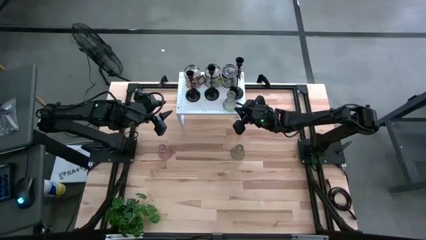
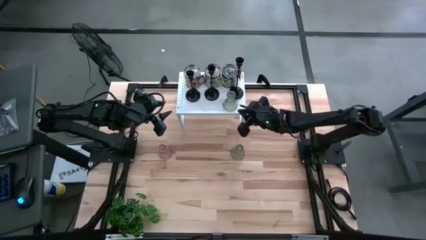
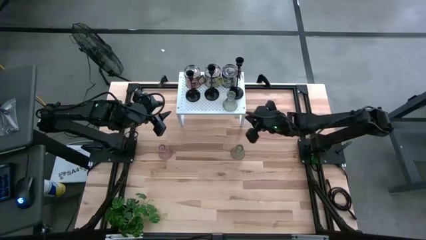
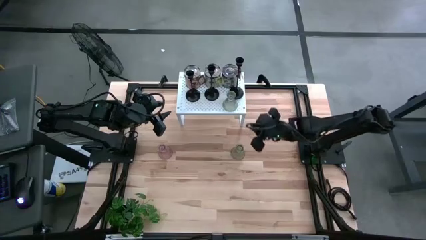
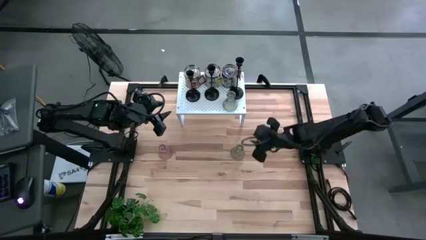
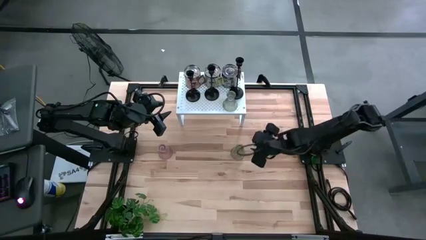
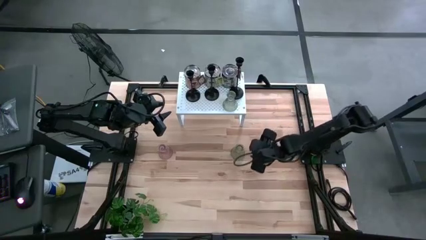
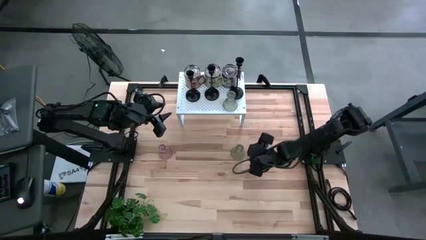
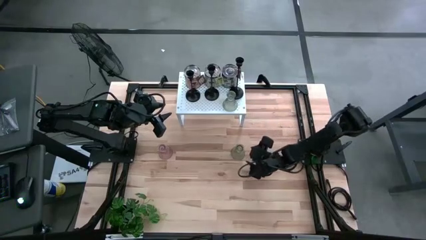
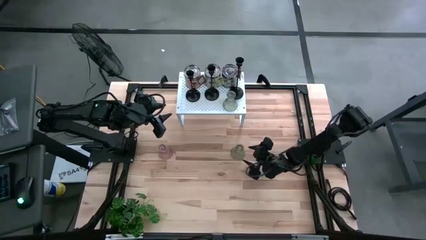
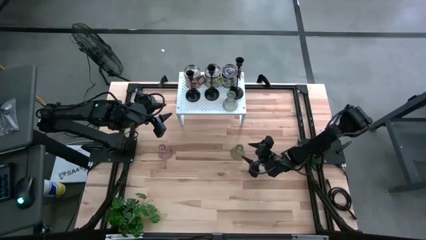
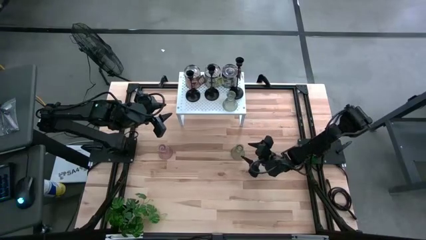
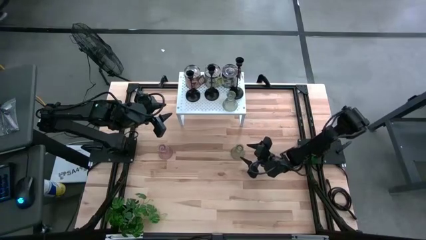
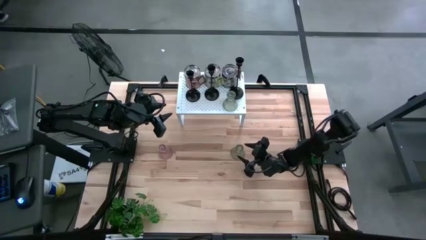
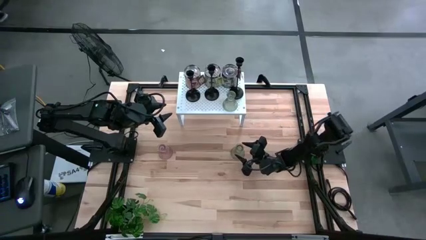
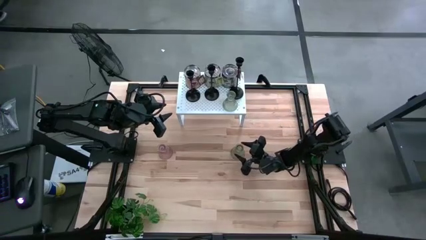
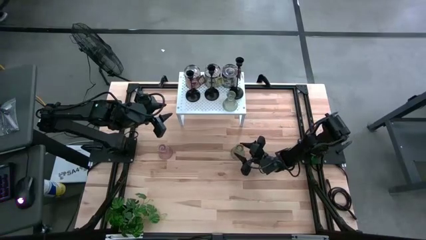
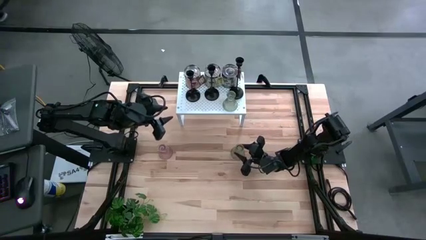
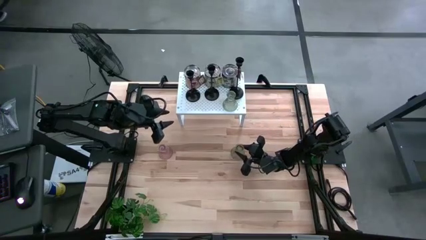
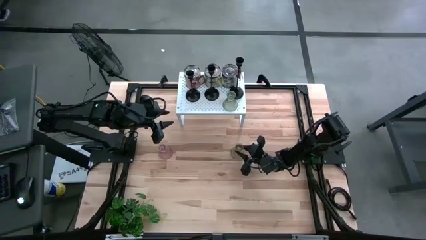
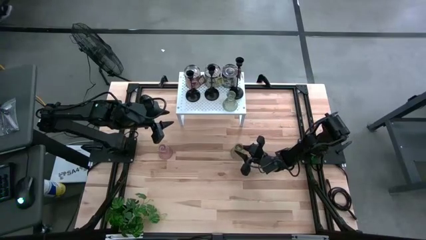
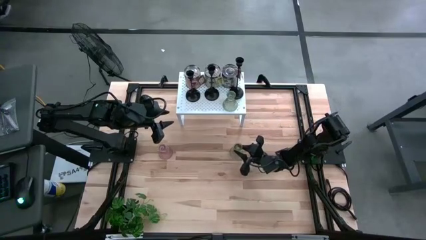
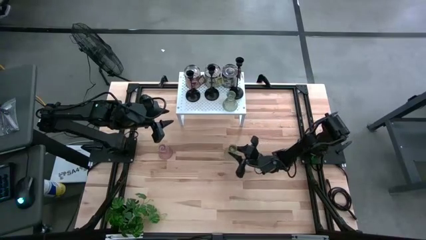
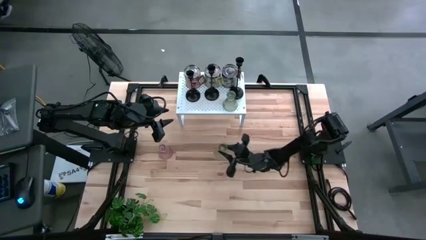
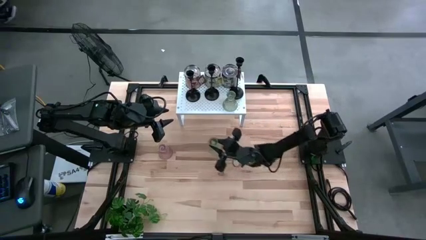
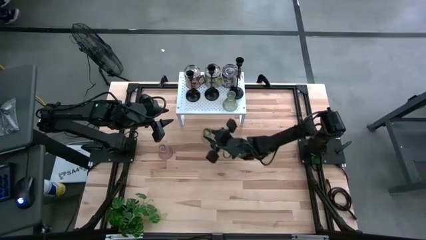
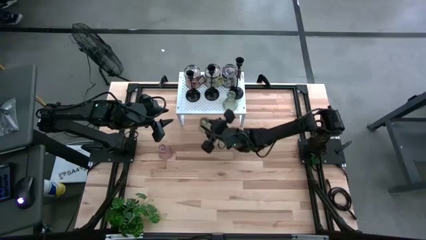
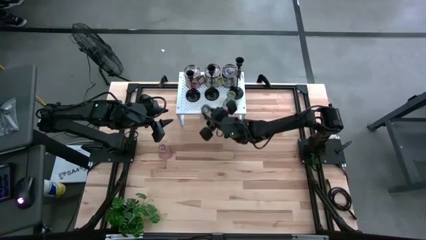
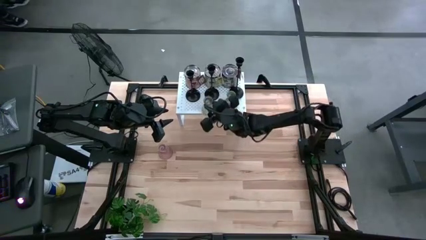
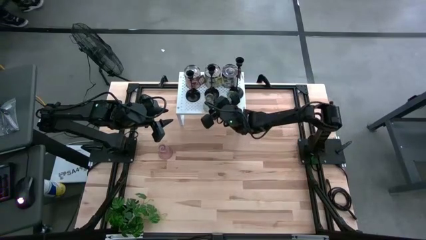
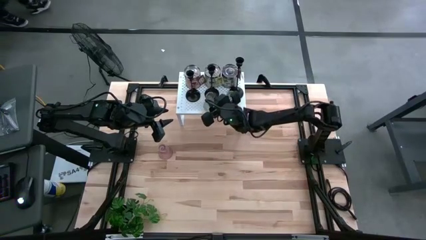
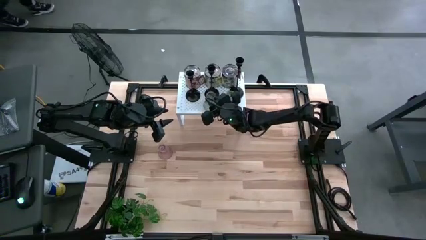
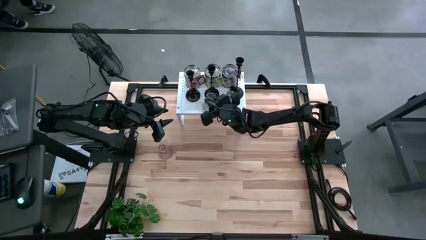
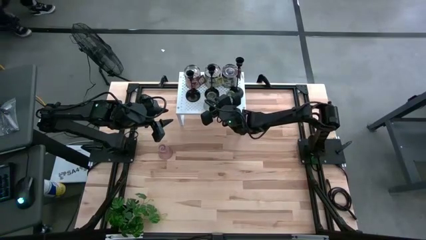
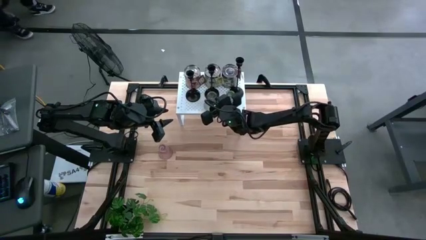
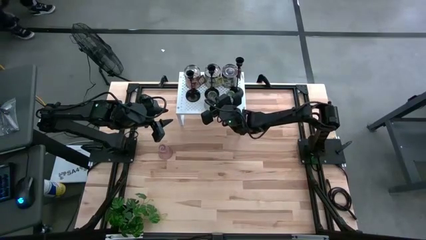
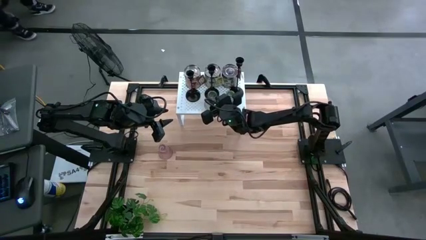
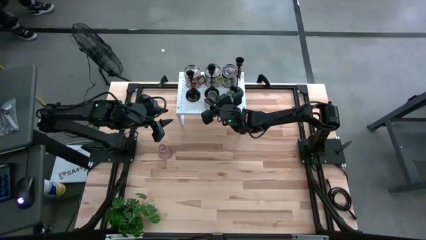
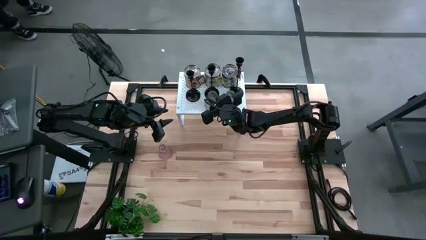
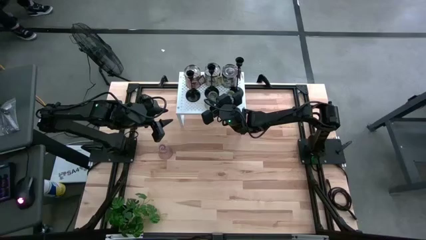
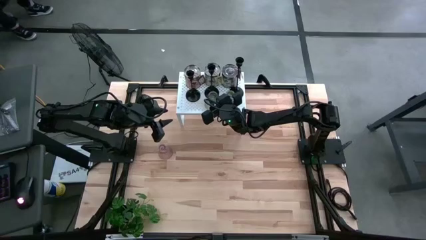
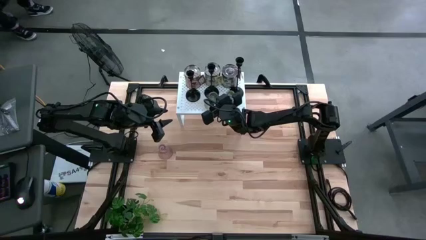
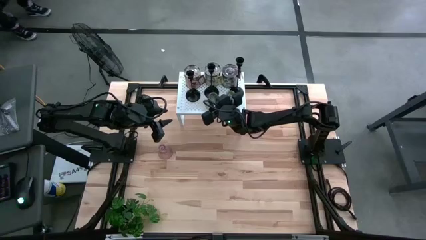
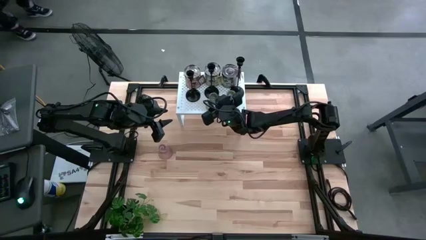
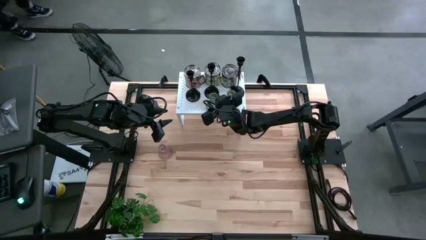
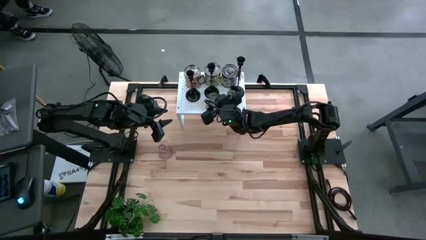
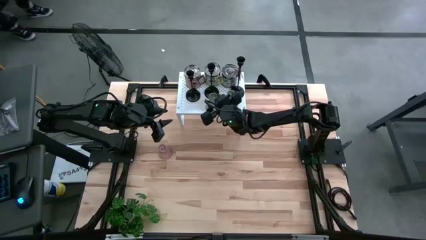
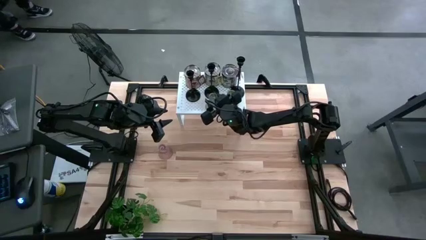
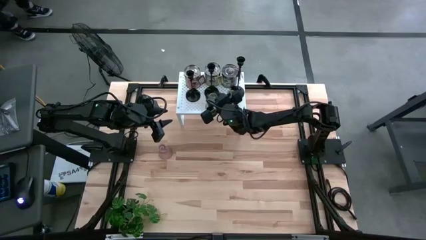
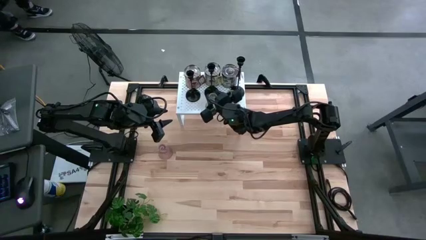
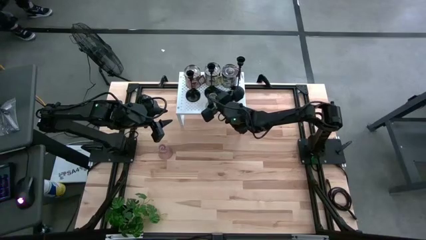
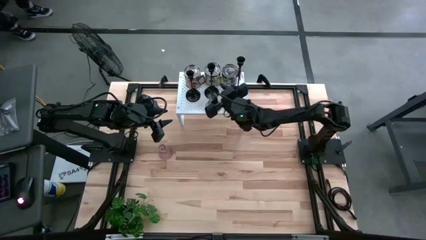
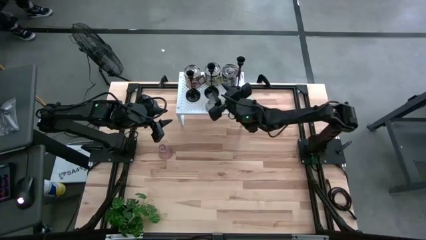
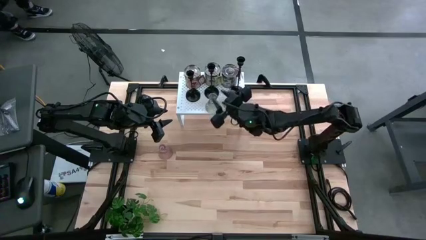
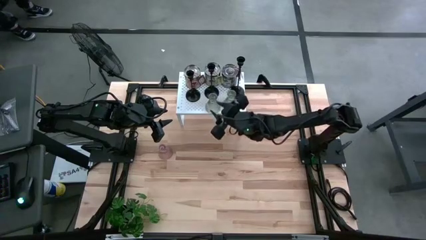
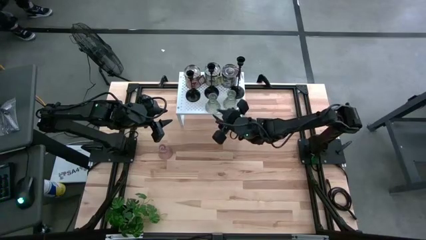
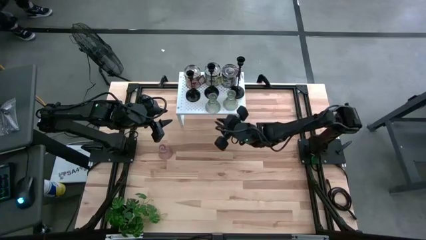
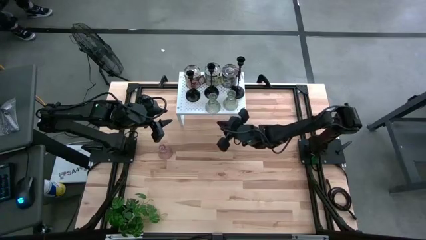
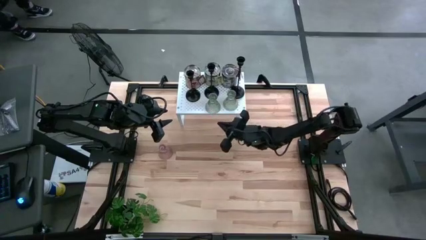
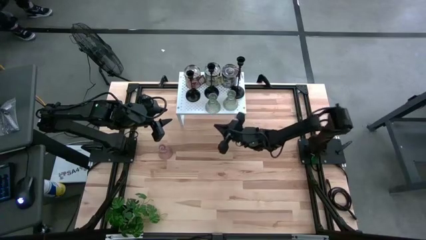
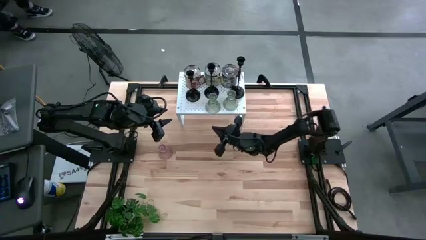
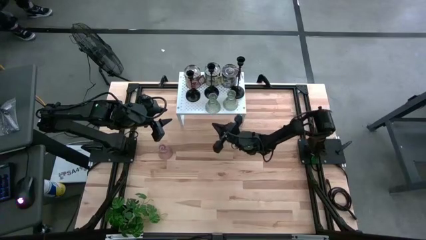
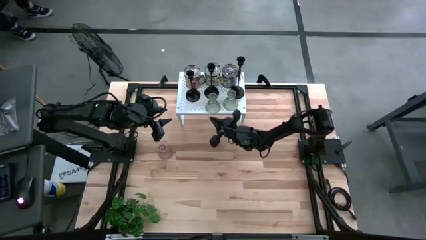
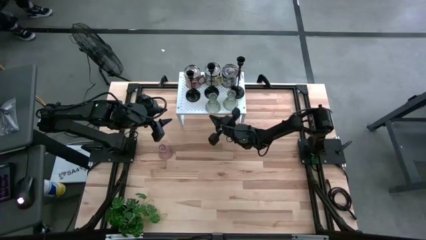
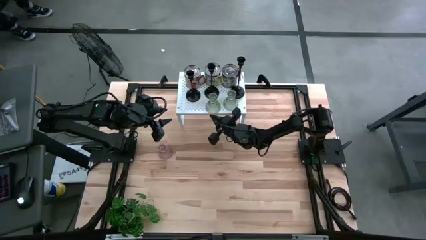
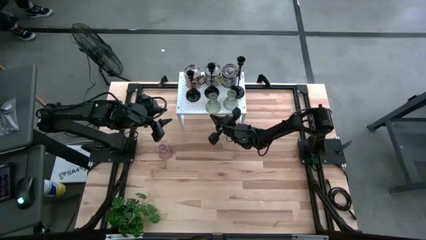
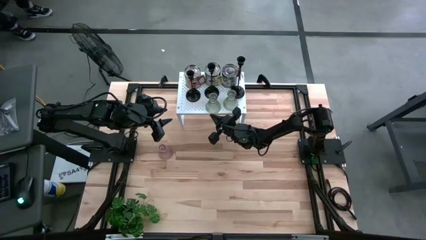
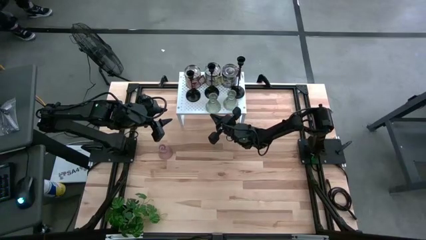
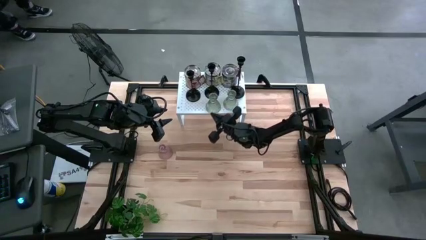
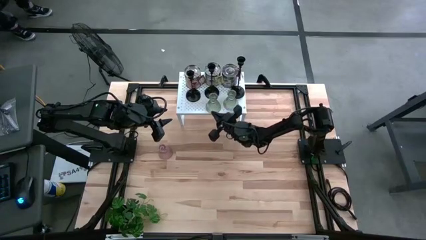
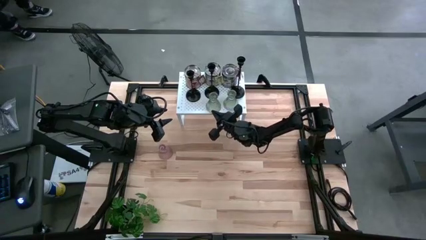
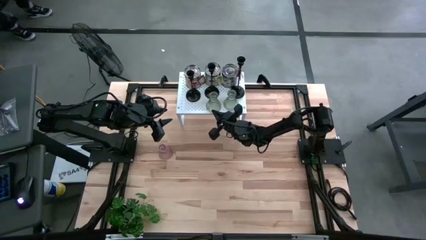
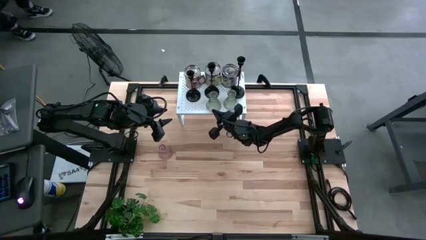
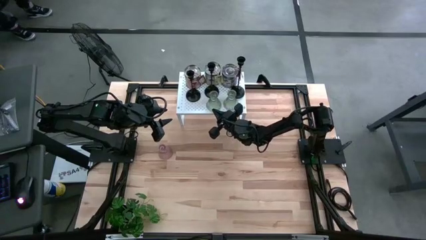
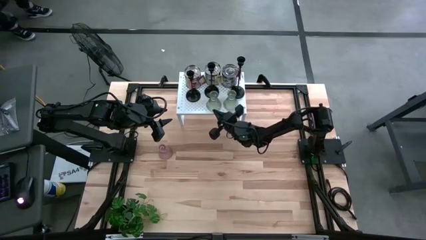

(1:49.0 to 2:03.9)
Task: Pick & Place candle stick holders
Align the transparent candle holder on the shelf with the other transparent candle holder

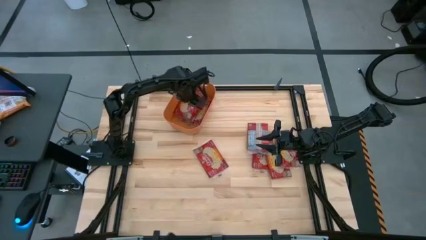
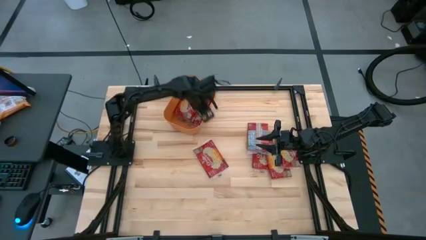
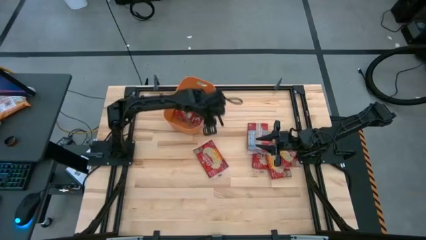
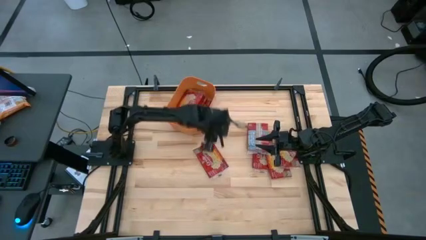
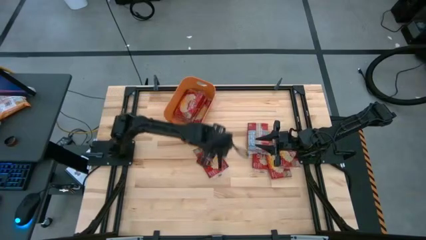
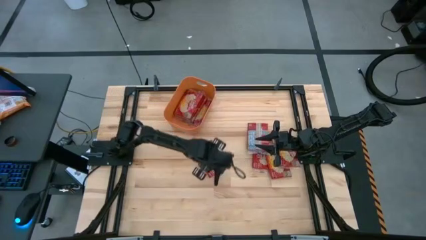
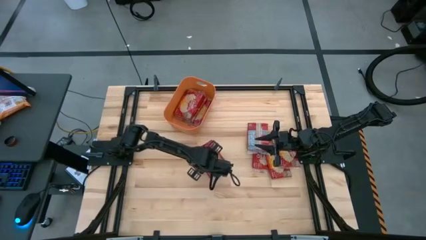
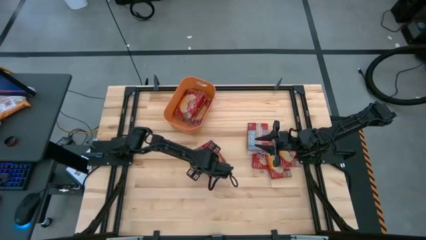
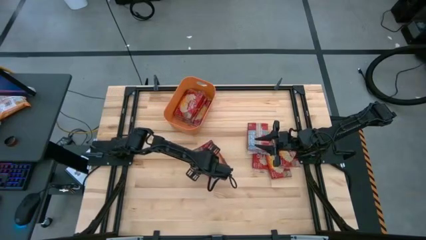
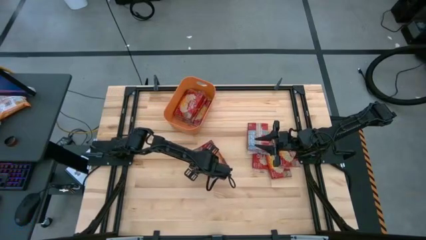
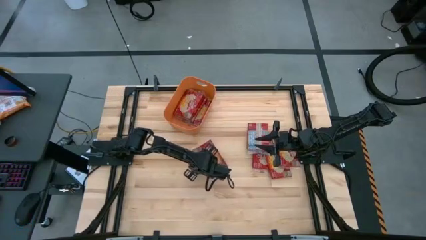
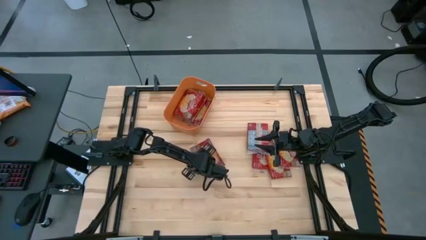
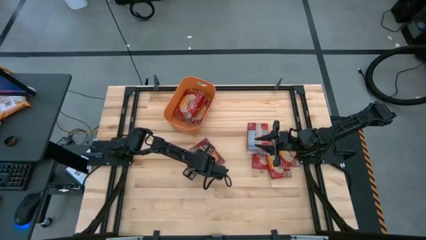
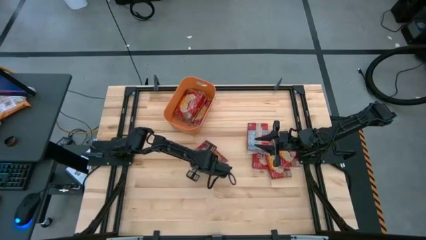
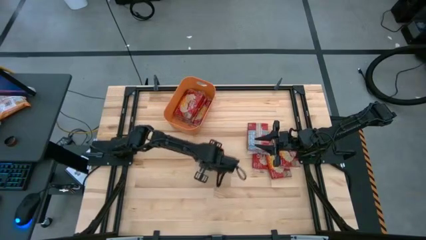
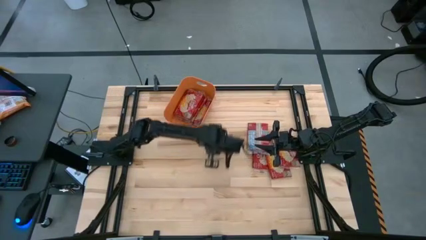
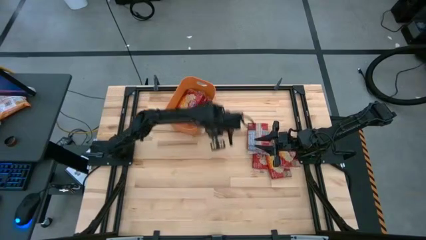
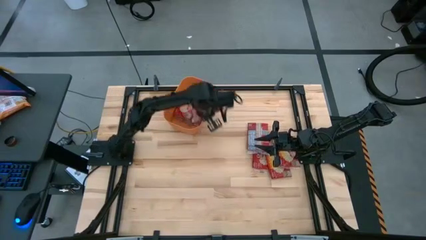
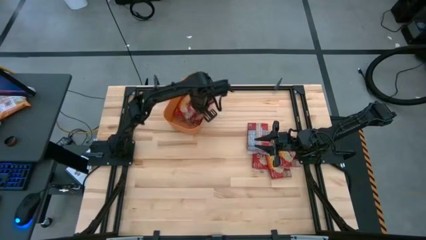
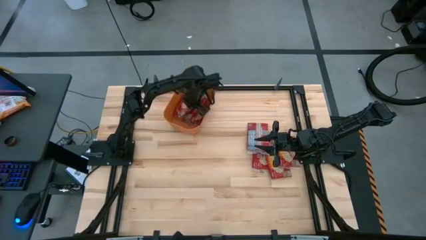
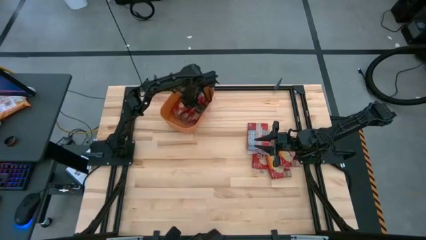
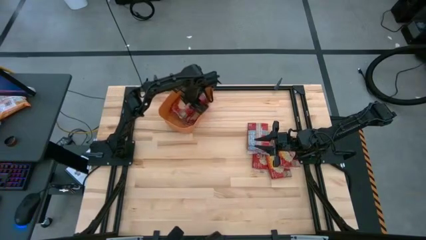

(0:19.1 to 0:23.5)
Task: Sort popcorn bags into baskets
Put the red popcorn bag into the orange bin
